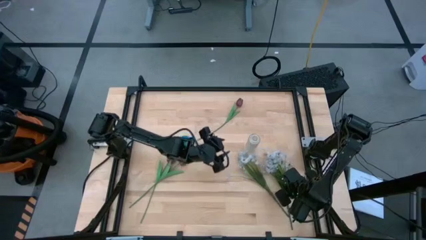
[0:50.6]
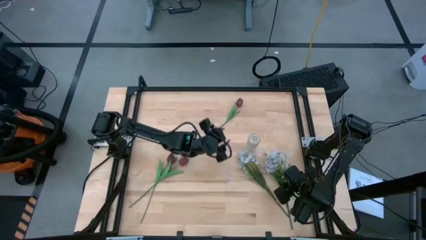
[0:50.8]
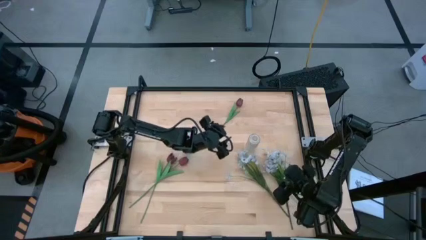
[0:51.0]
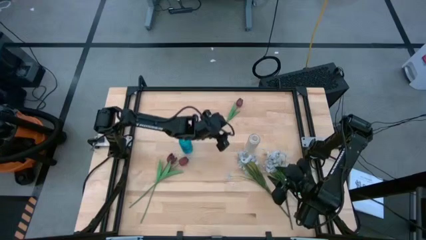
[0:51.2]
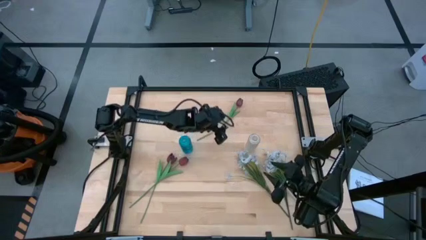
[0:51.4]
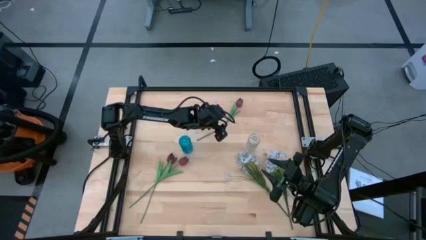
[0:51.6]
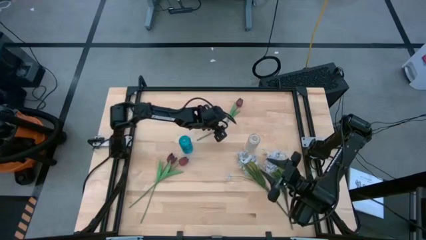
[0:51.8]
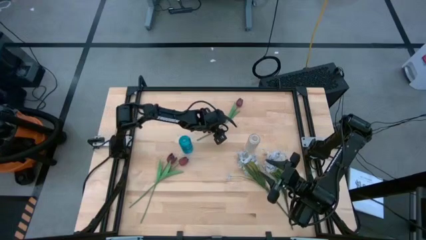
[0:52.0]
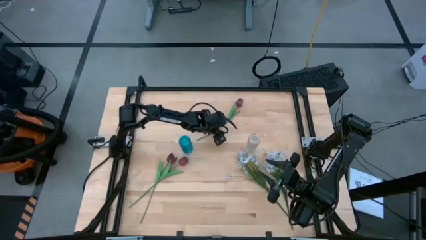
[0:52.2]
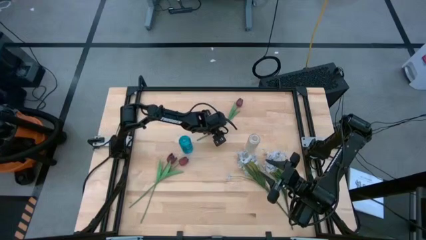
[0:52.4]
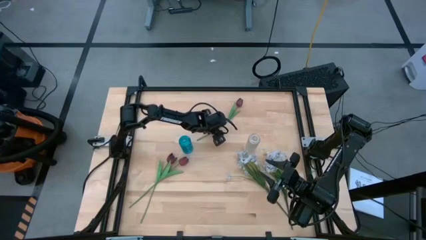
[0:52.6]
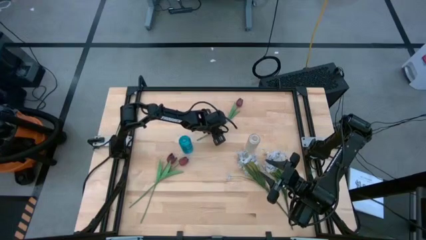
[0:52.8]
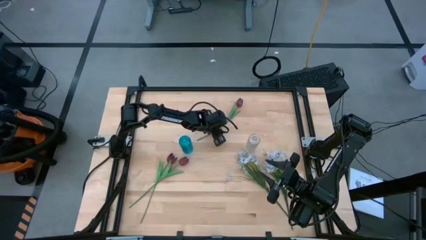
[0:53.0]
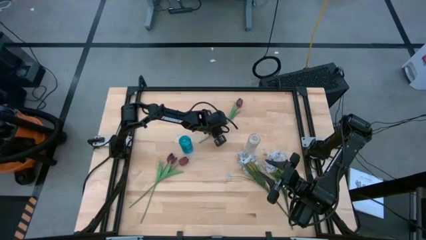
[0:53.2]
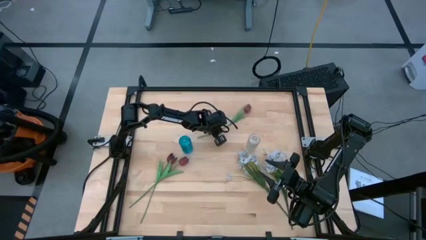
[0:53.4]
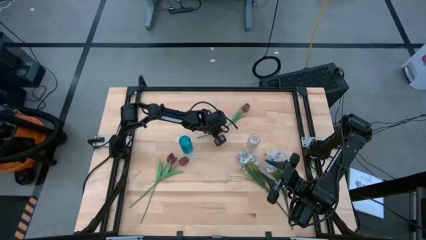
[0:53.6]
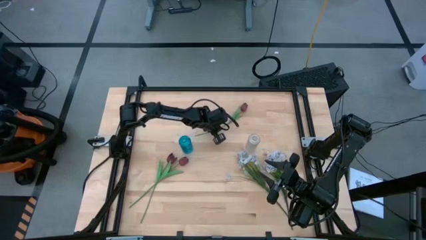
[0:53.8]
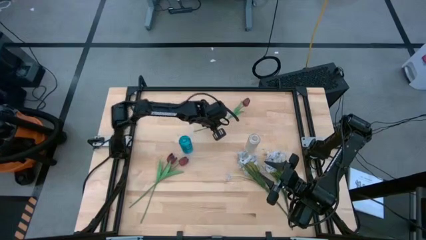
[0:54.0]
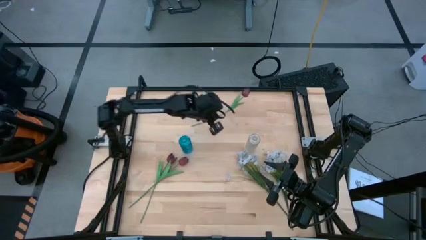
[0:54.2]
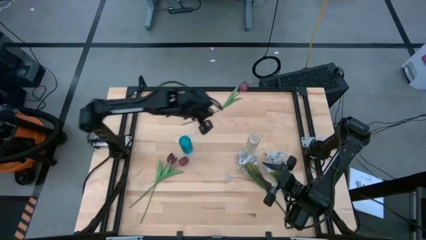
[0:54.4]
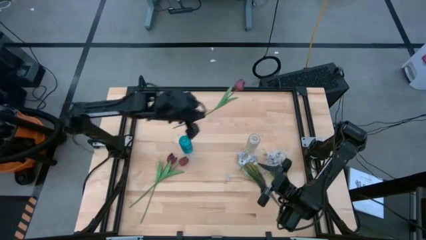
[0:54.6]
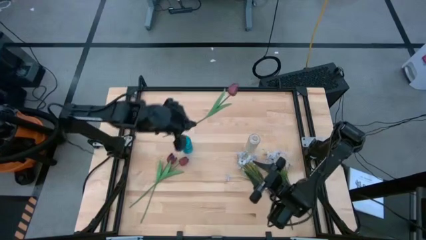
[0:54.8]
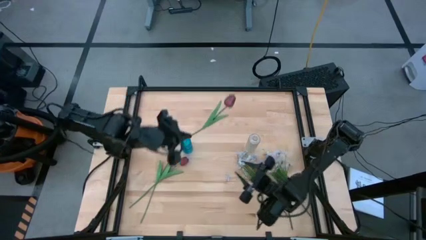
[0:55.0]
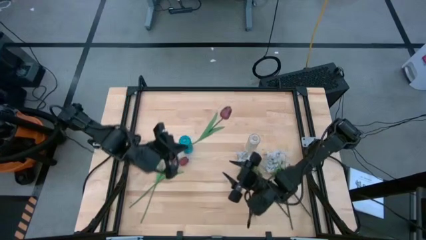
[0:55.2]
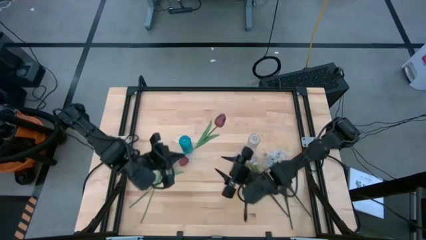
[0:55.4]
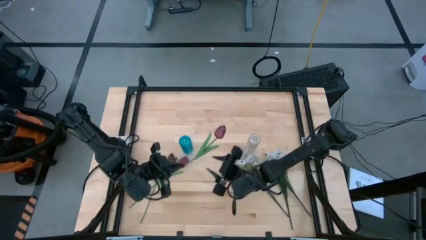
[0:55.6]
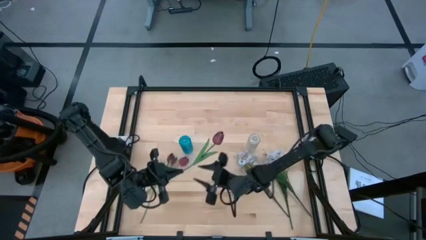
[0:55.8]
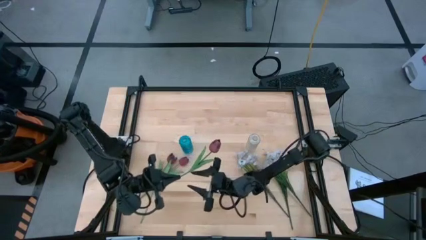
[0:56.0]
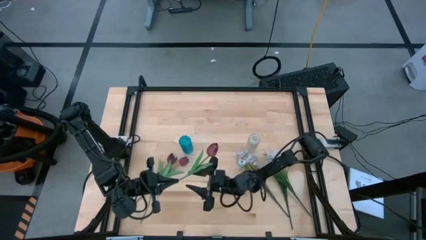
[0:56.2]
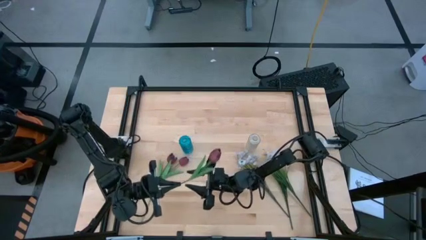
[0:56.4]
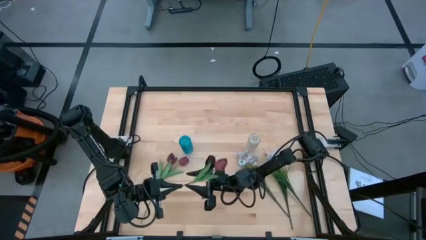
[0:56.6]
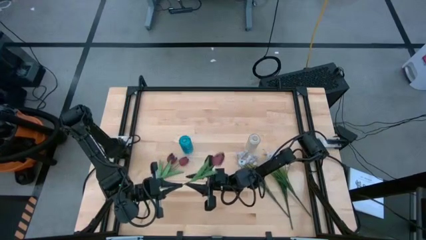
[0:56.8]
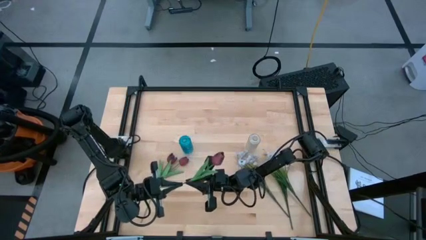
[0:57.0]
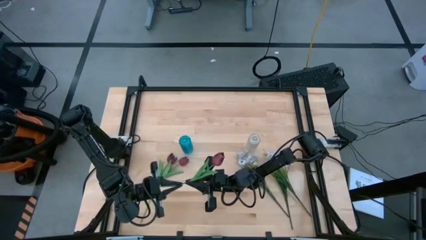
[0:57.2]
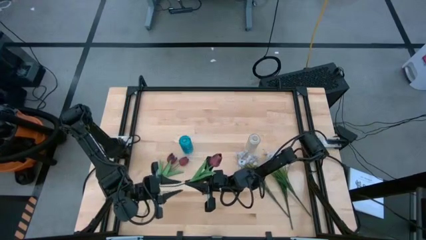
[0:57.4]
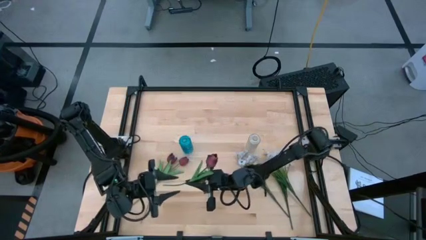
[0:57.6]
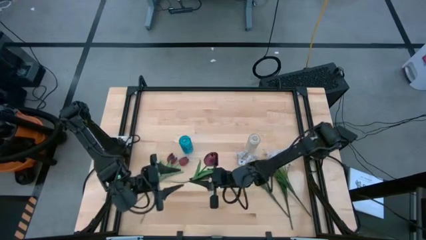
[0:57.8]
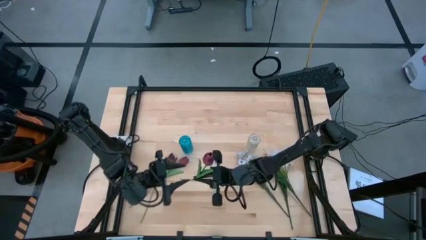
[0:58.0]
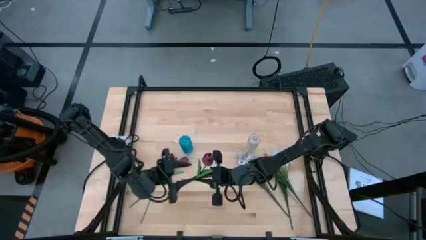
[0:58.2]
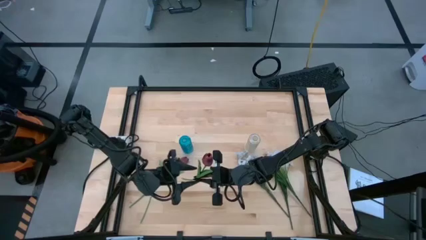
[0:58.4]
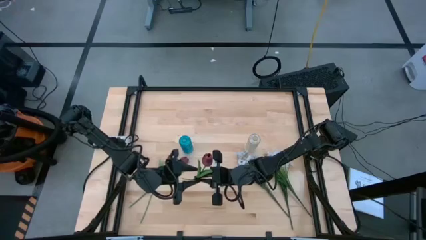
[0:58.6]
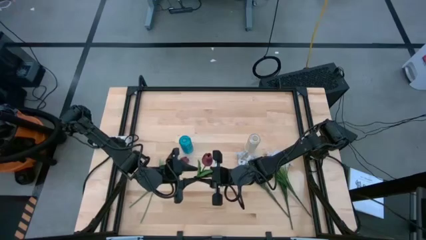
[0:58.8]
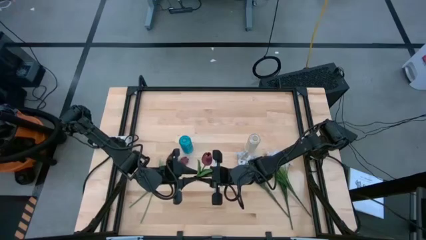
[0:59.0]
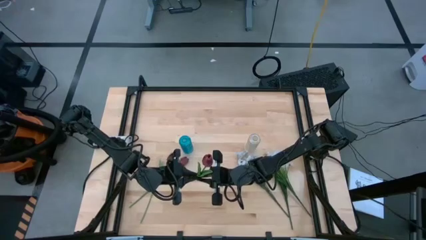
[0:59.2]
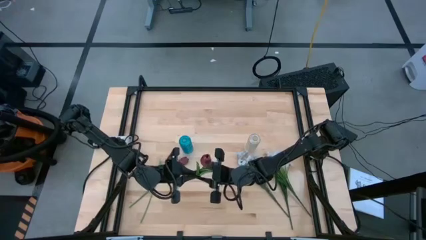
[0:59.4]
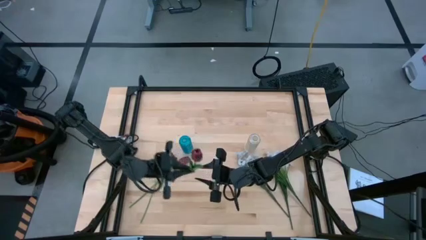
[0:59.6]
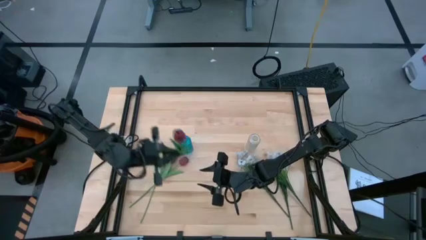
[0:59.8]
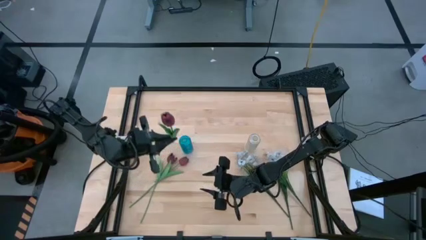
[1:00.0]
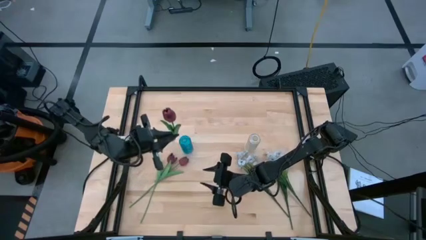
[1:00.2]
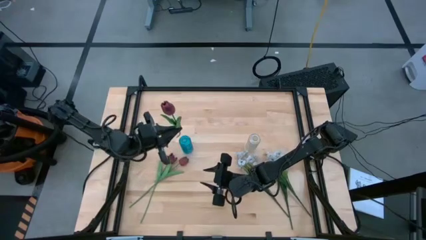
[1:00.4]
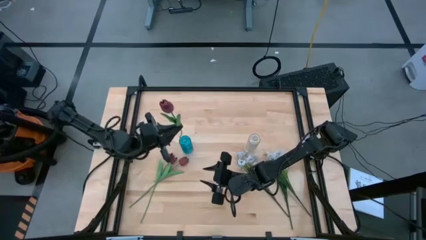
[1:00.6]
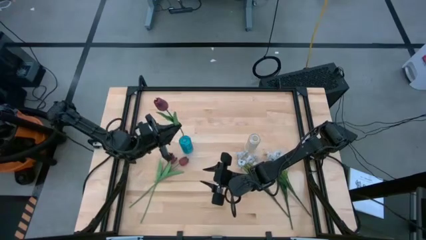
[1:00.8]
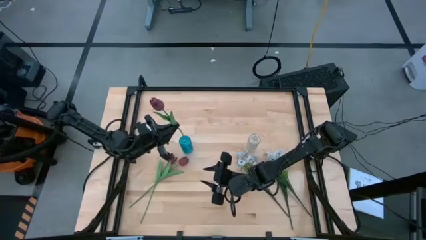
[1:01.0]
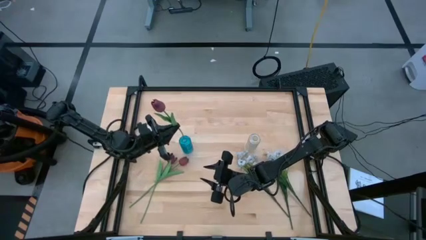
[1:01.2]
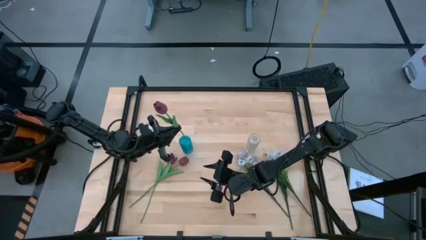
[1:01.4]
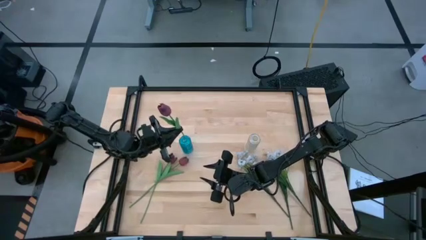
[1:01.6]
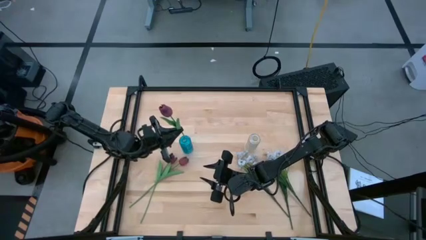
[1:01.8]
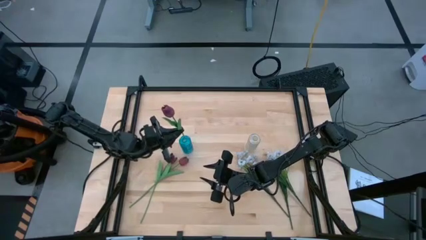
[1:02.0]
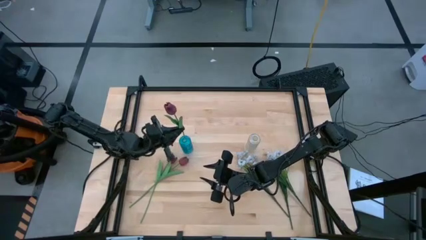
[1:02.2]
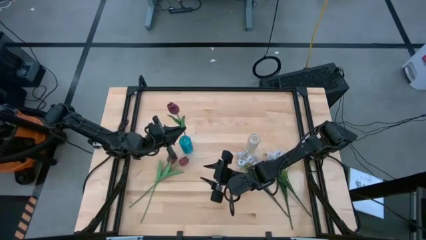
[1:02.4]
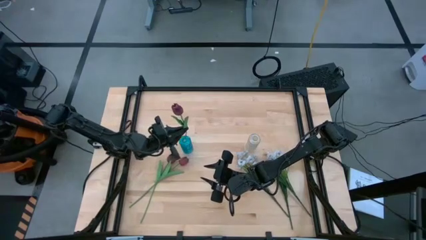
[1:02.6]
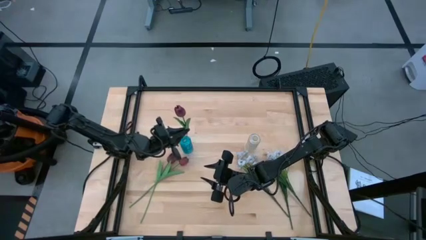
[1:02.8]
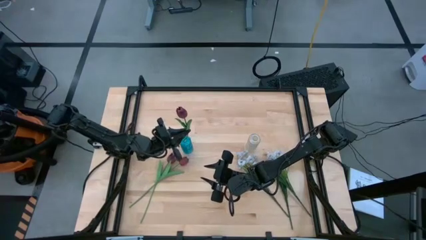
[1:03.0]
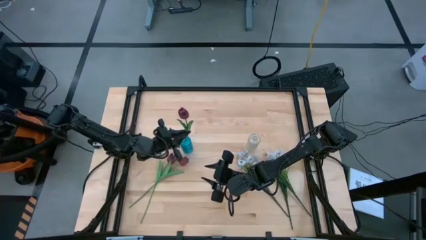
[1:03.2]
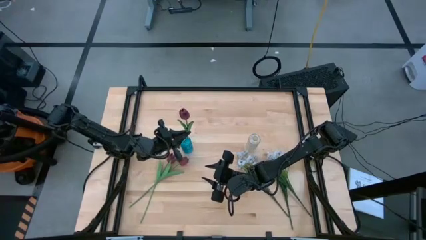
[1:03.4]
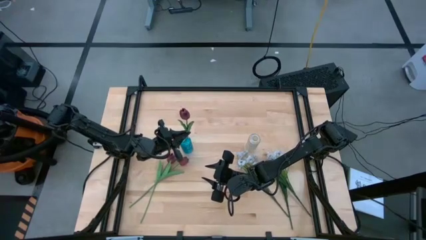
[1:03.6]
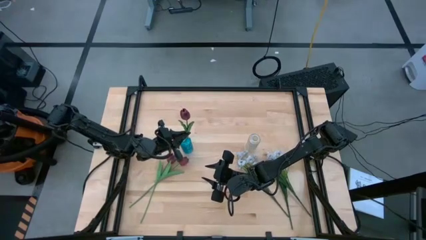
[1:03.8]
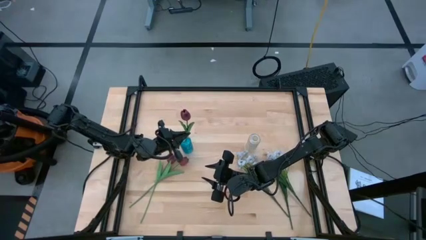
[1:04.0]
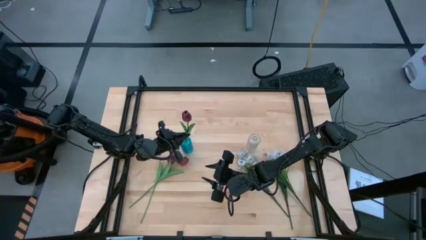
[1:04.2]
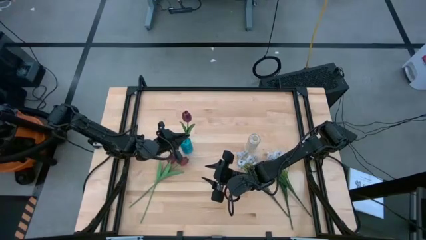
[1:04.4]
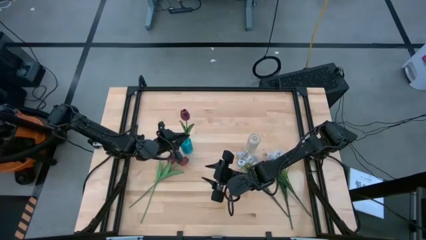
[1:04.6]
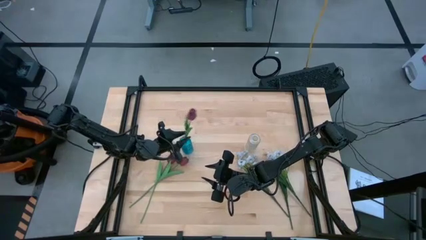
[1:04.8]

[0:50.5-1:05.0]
Task: Sort flowers into vase by color
Put the top red tulip into the blue vase
